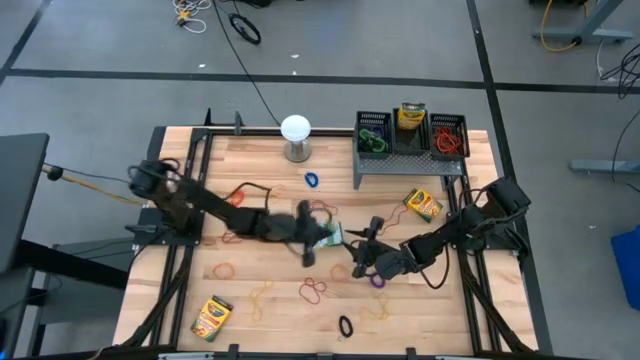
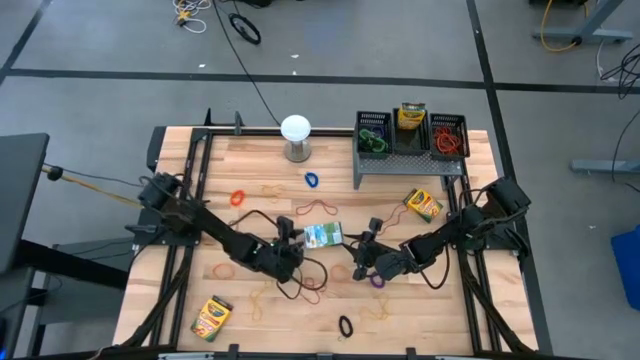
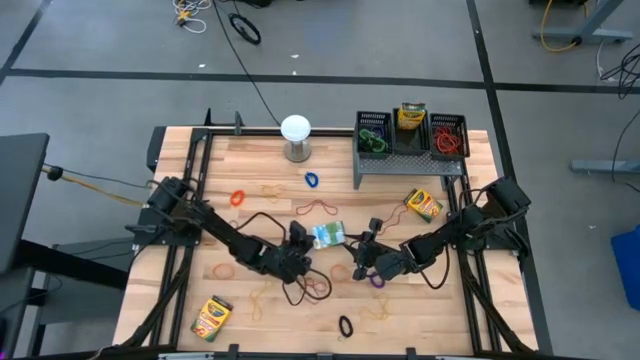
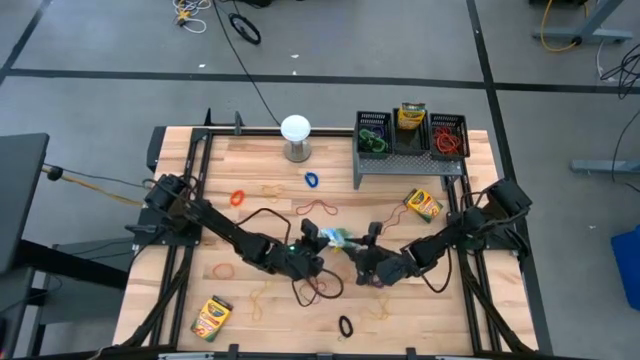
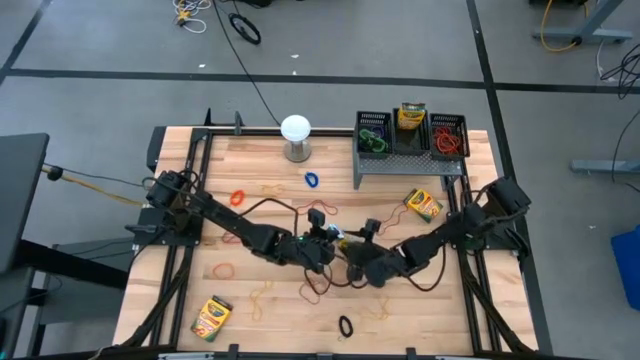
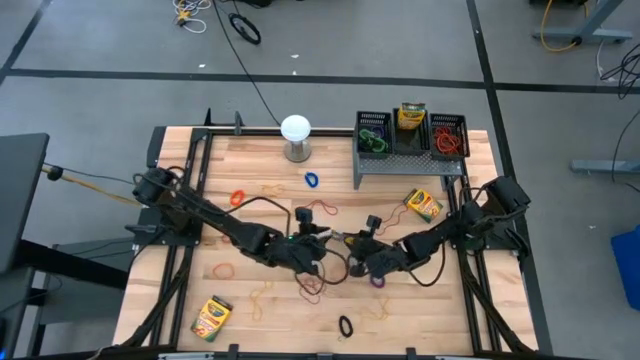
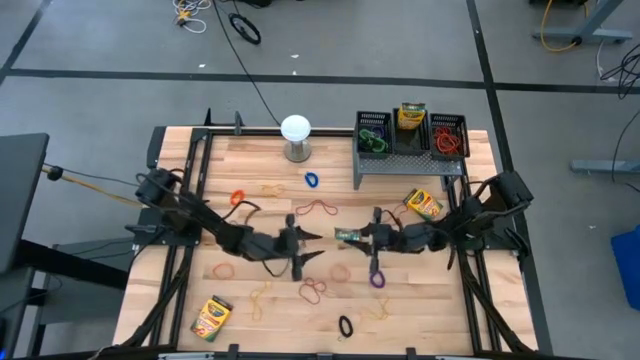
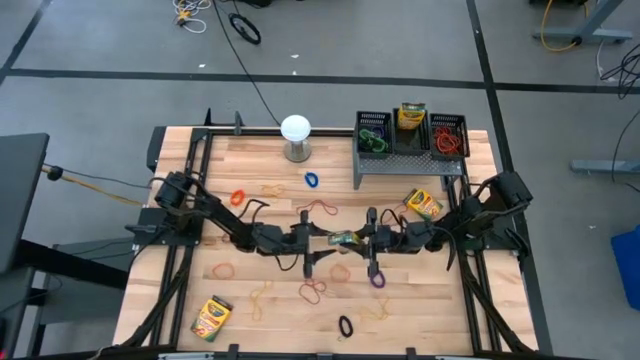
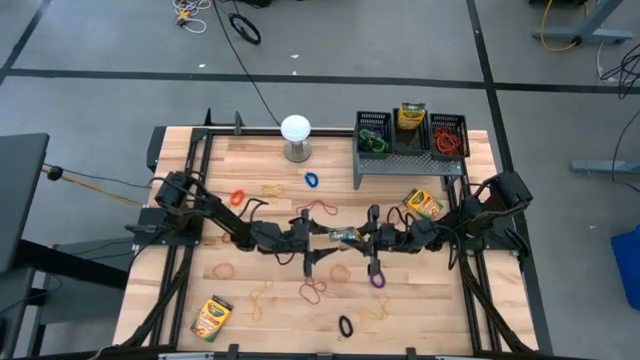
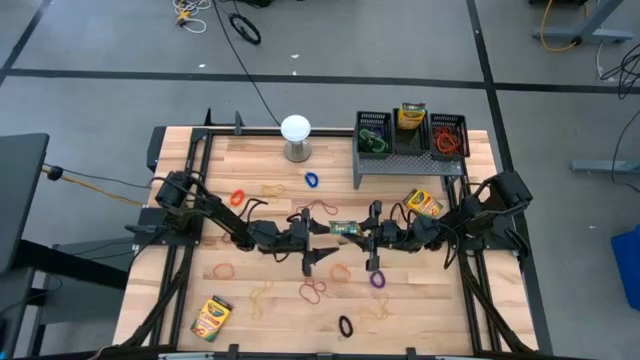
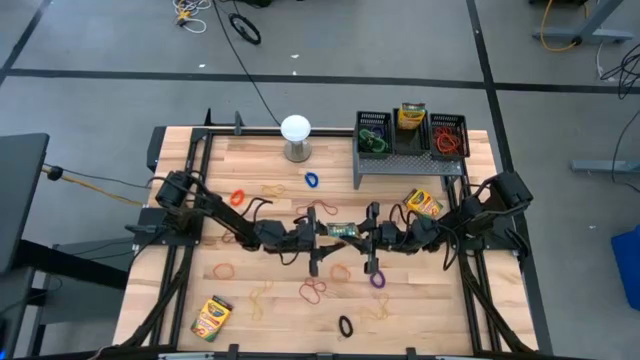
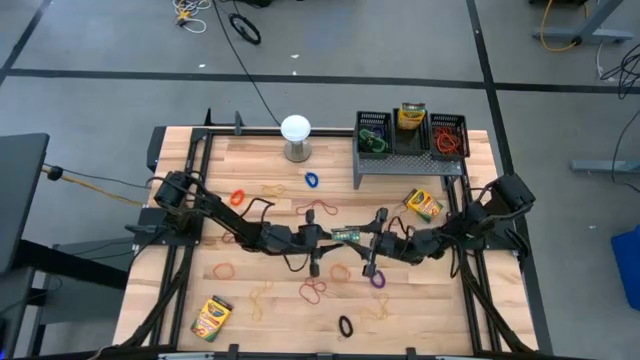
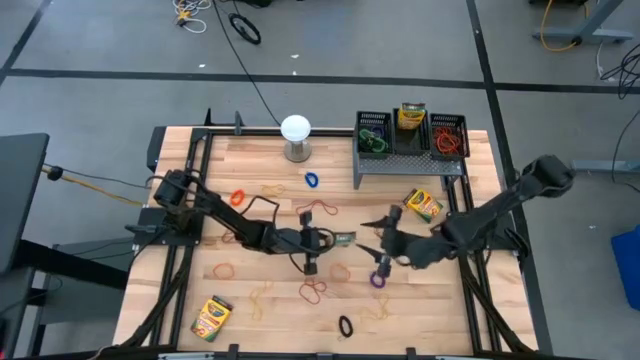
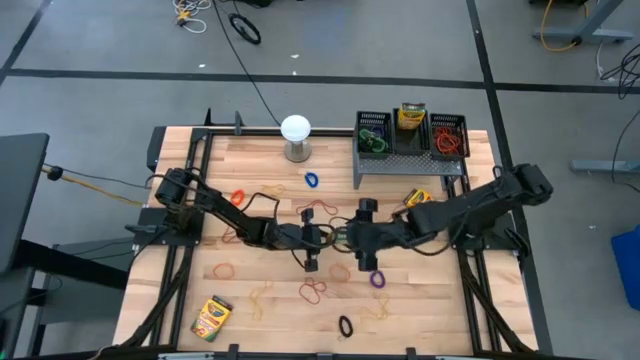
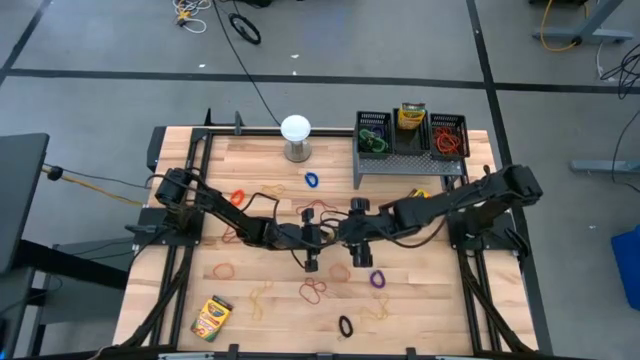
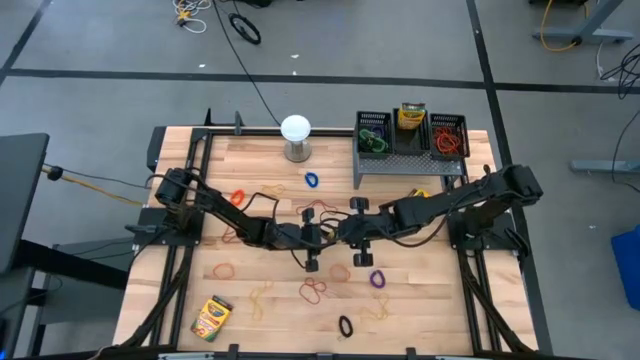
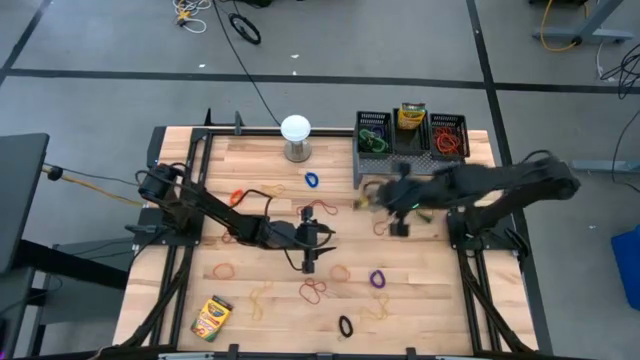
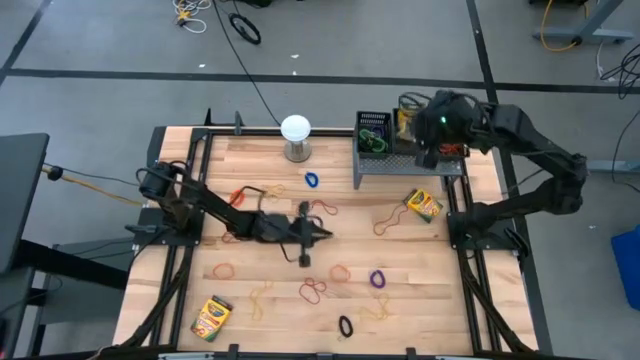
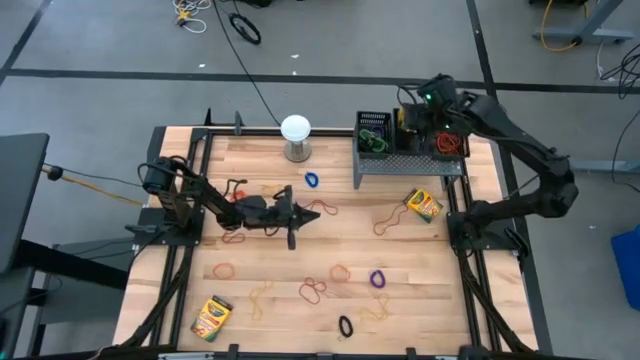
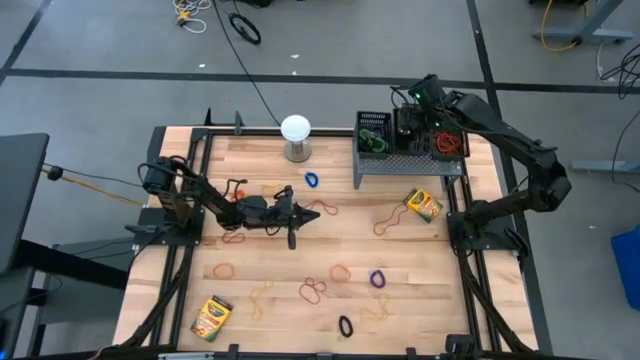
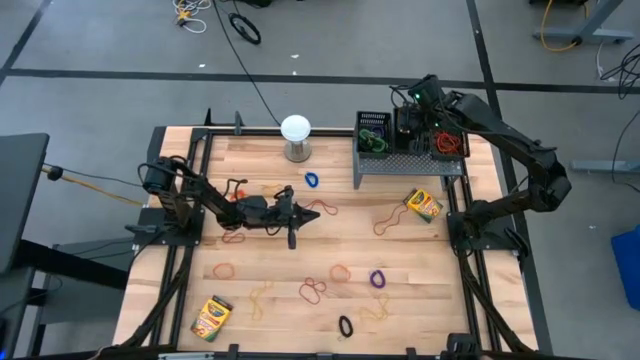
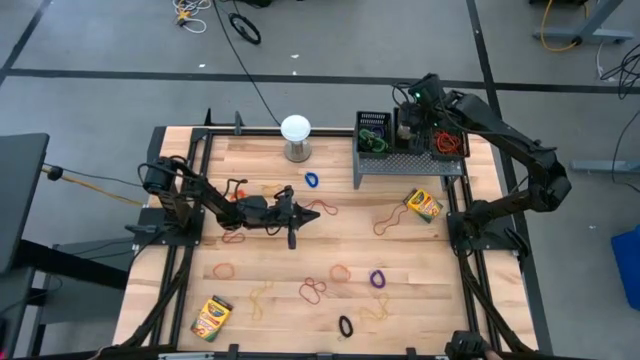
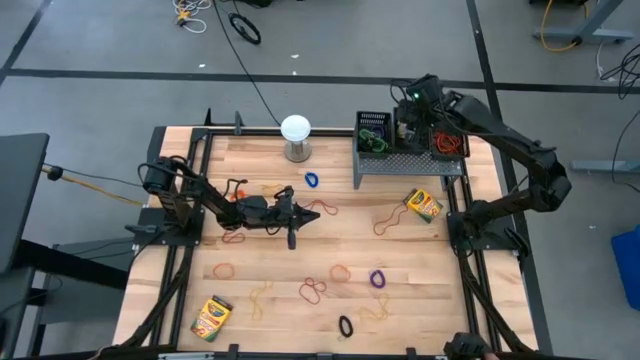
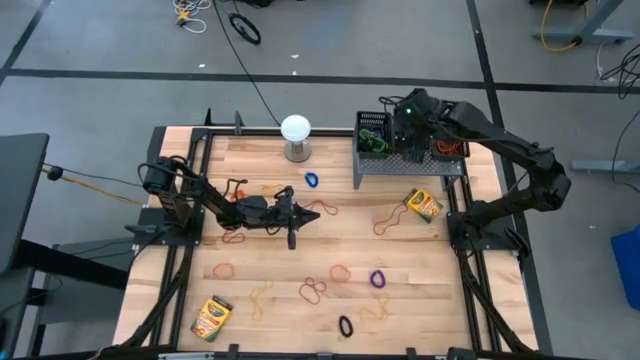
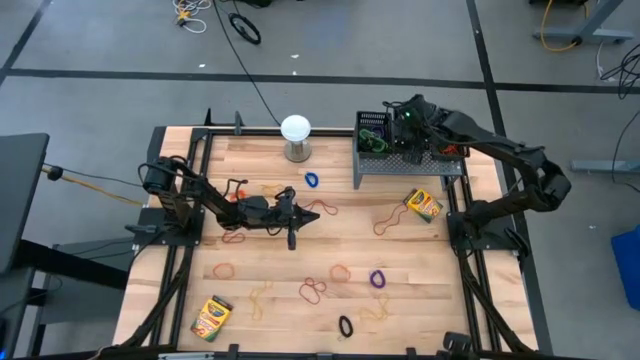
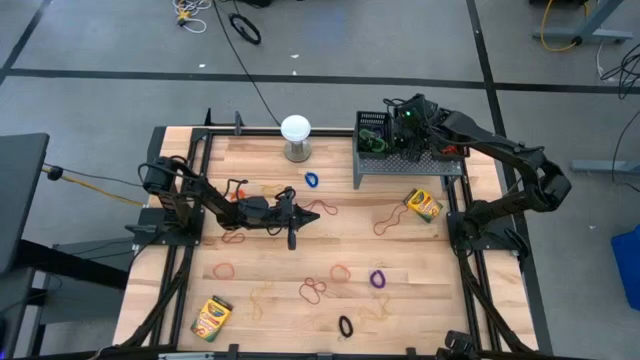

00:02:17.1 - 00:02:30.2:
Task: Pick & Place Office Desk Supplies
Put the yellow crayon box into the middle black basket on the shelf

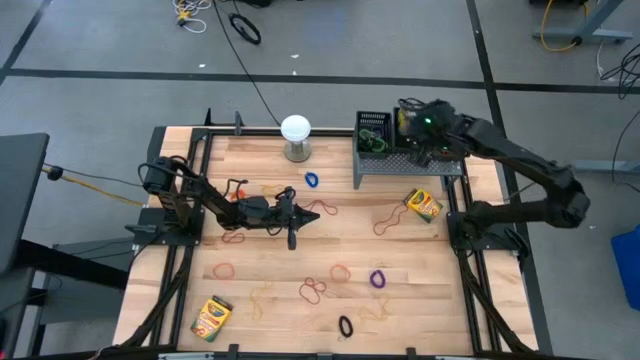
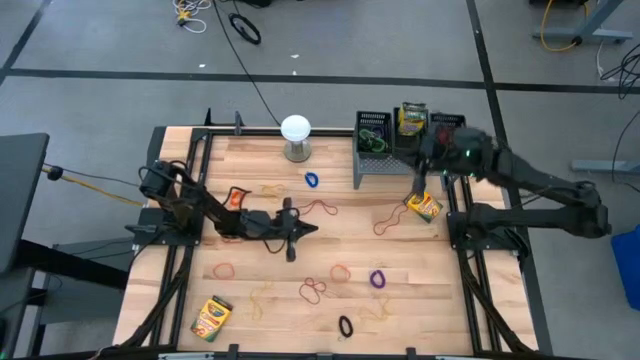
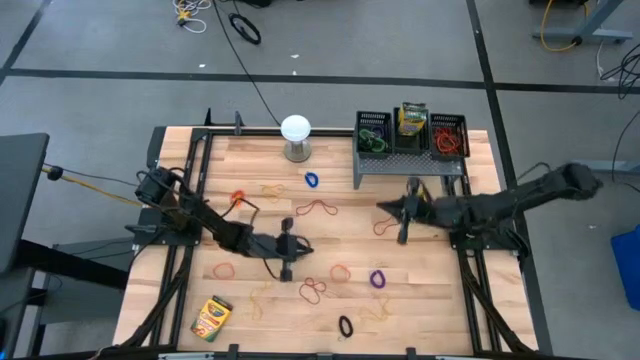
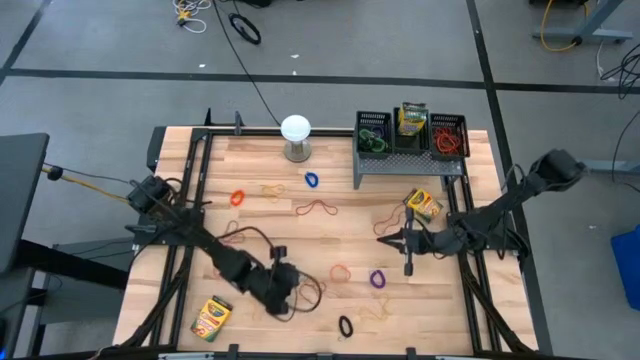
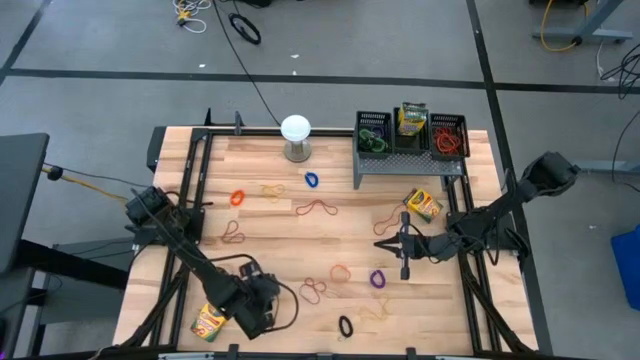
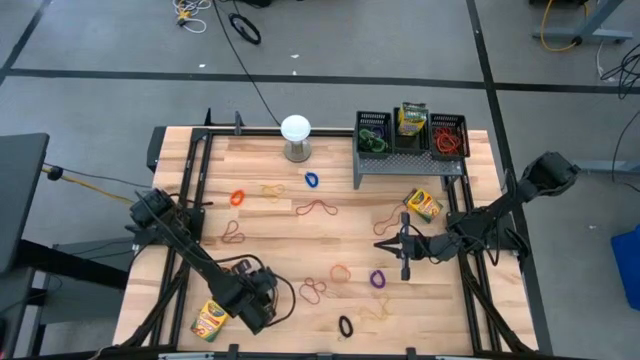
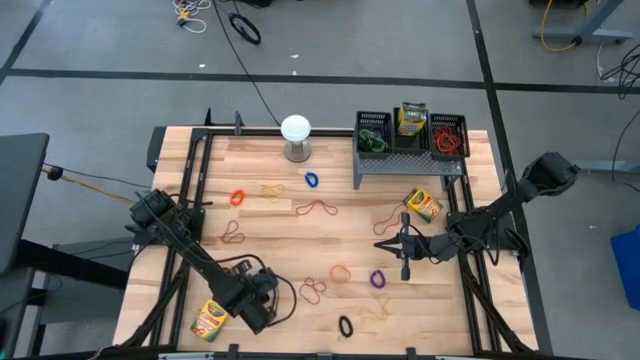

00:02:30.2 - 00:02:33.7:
Put the yellow rubberband into the right black basket on the shelf

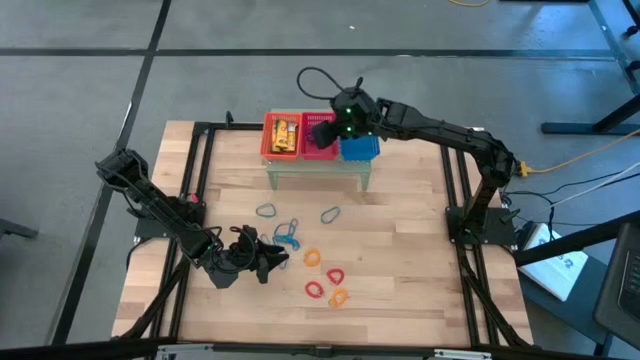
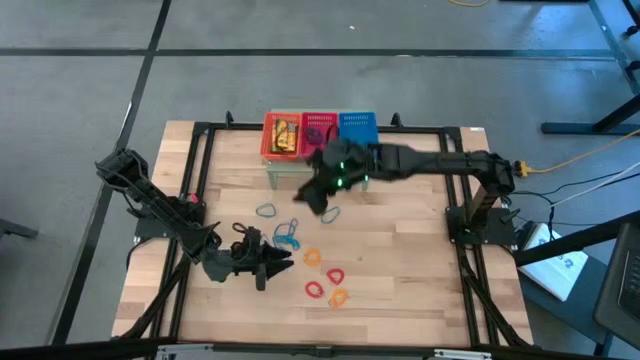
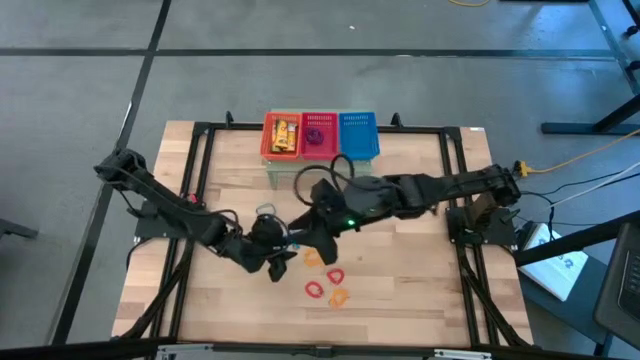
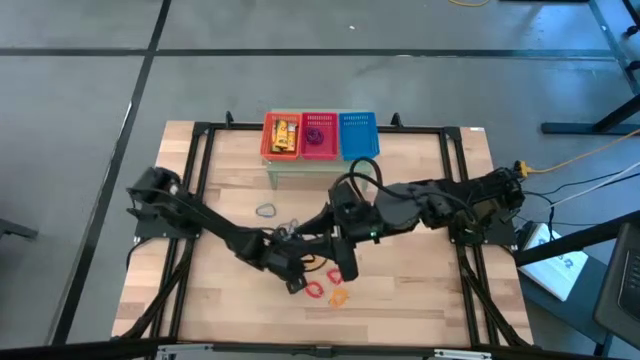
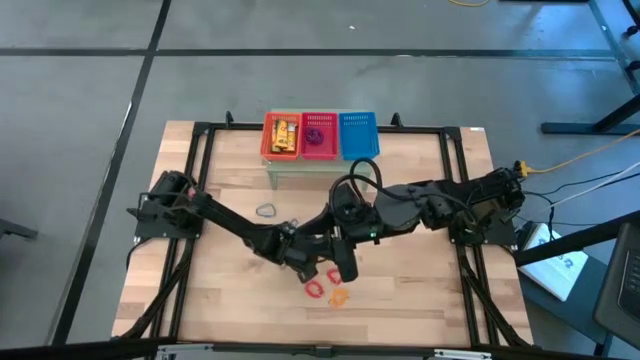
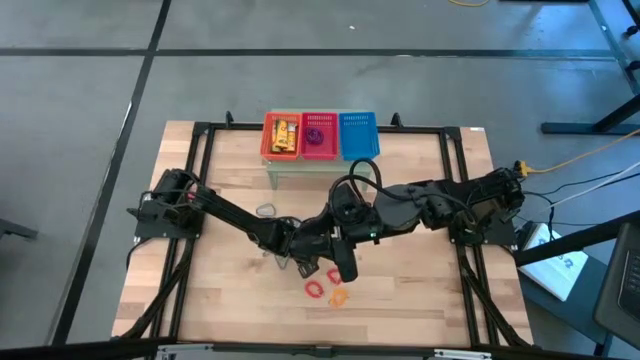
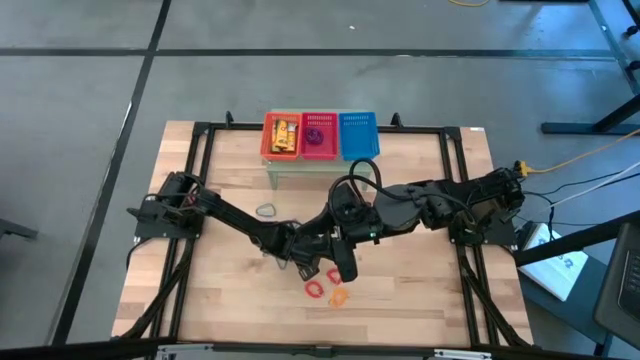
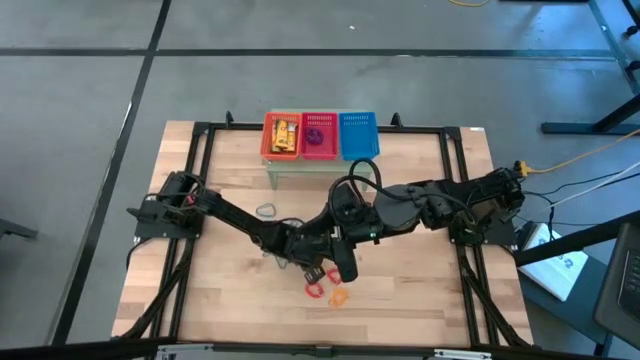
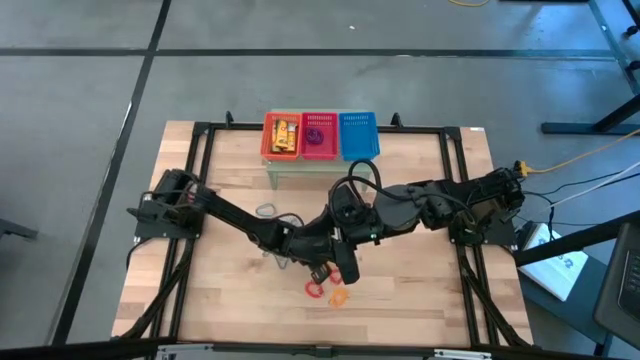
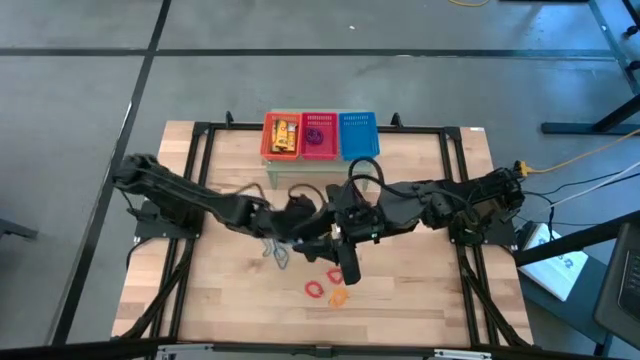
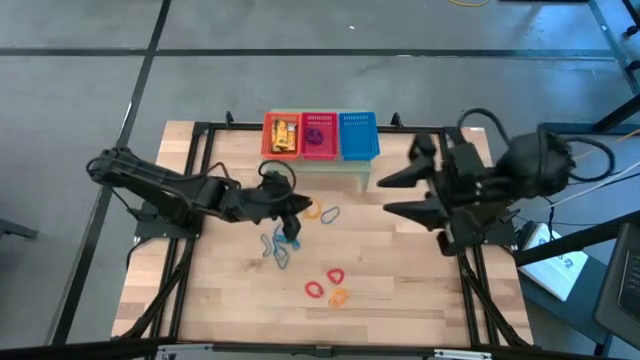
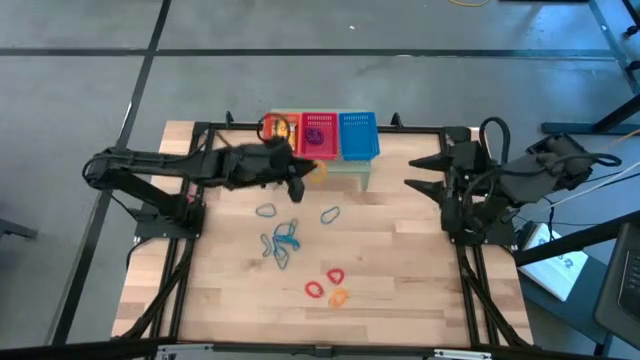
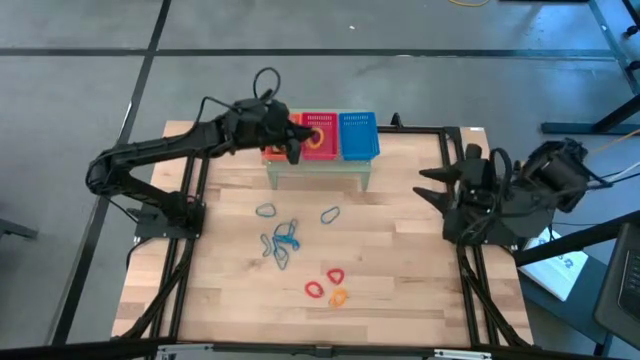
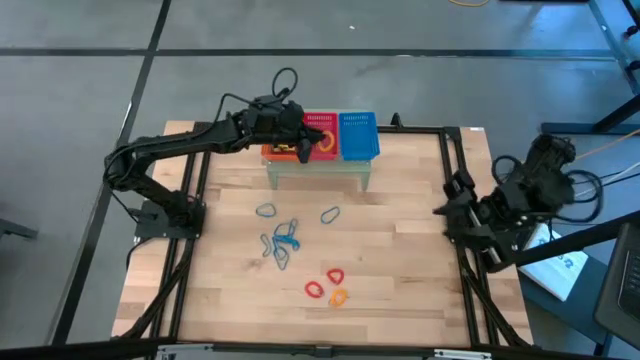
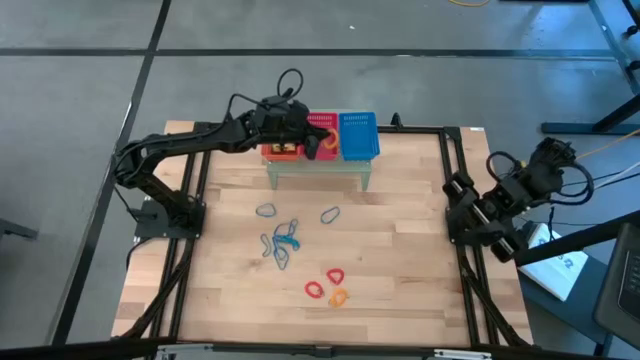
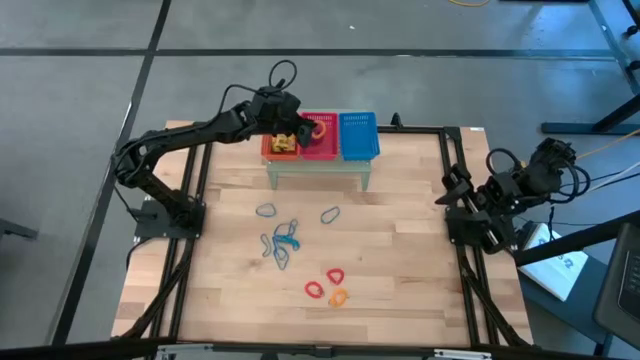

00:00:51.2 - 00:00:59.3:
Task: Pick & Place Office Desk Supplies
Put the yellow keychain into the red bin on the shelf
